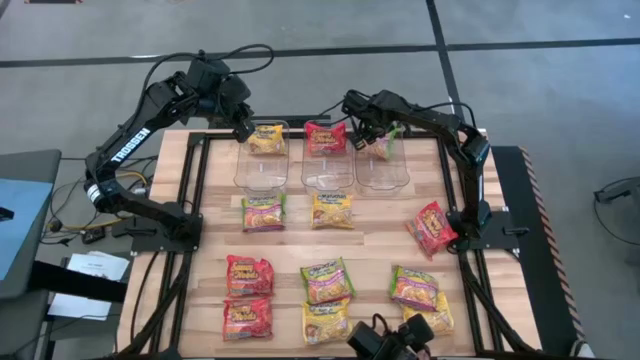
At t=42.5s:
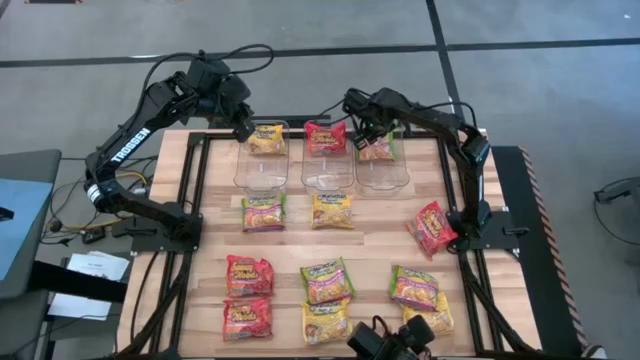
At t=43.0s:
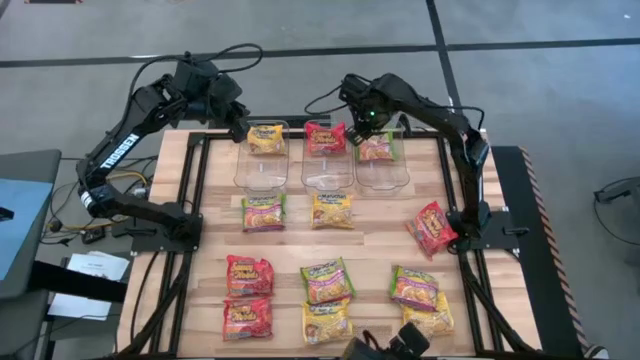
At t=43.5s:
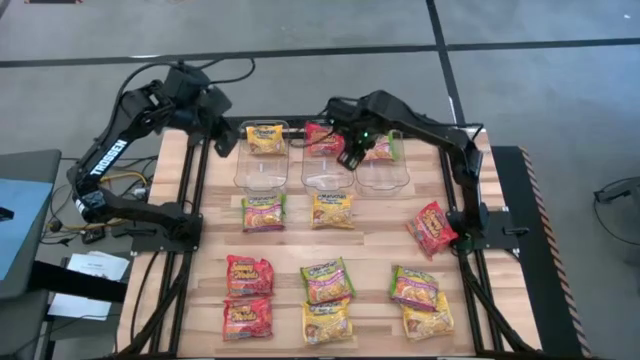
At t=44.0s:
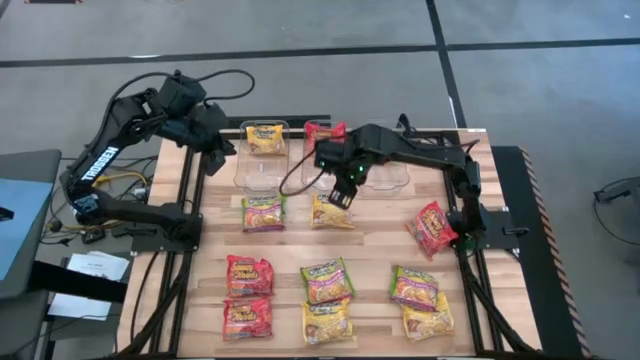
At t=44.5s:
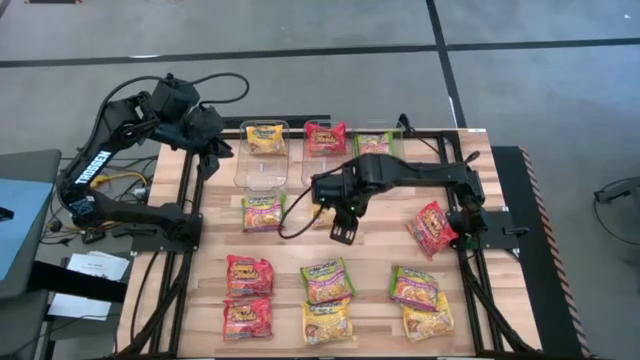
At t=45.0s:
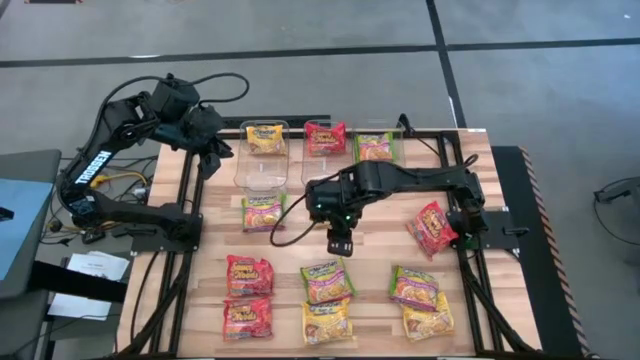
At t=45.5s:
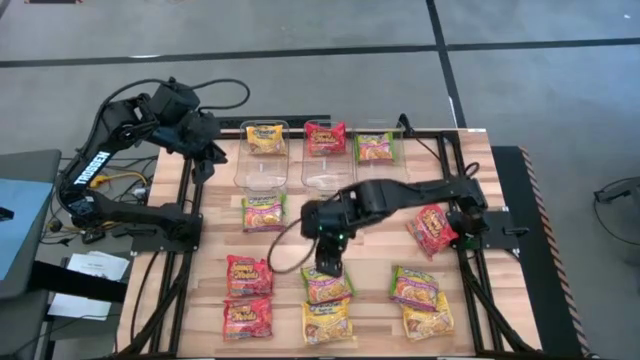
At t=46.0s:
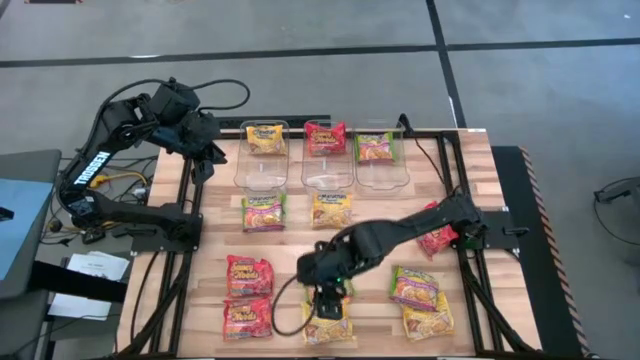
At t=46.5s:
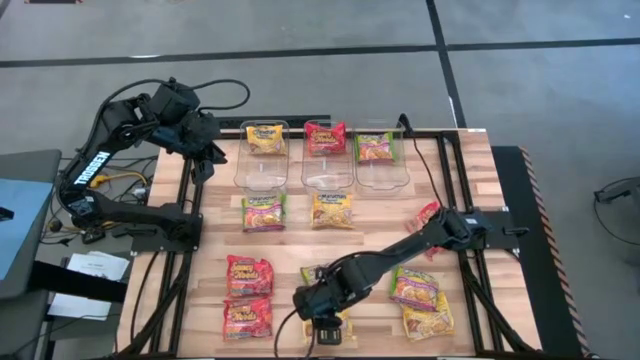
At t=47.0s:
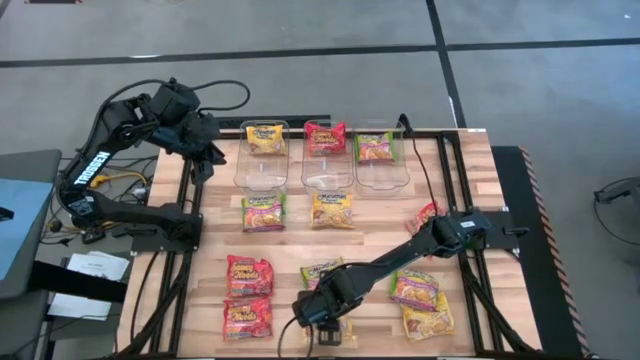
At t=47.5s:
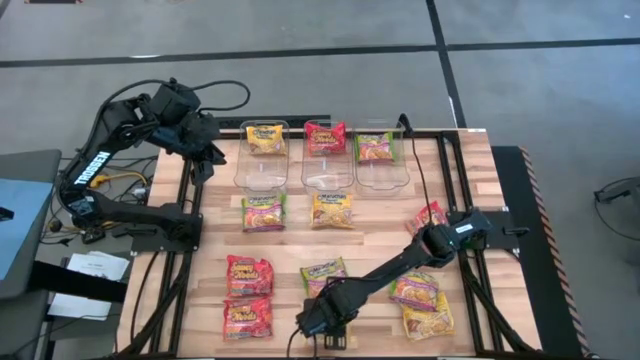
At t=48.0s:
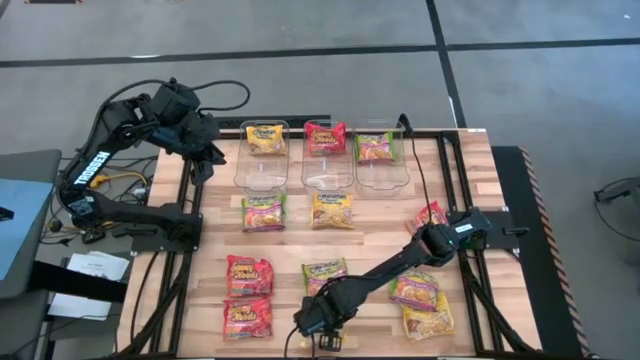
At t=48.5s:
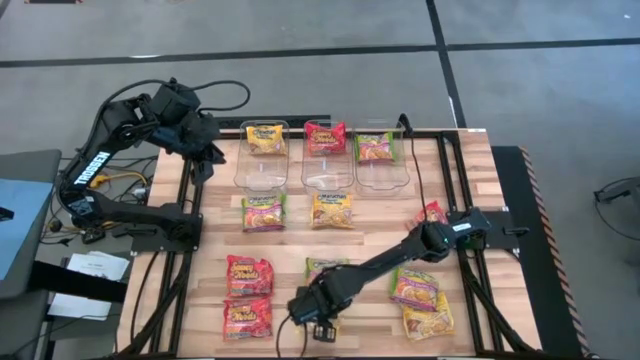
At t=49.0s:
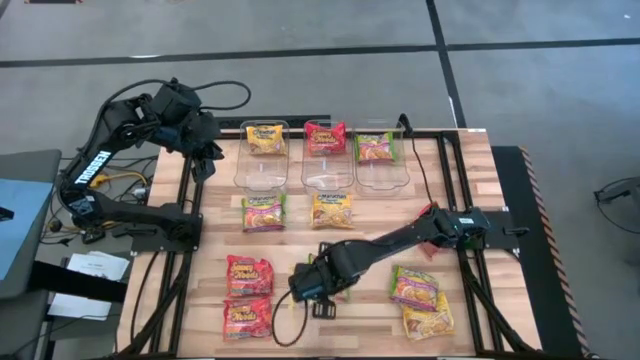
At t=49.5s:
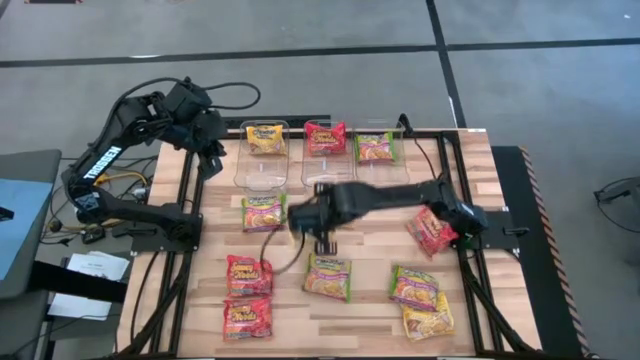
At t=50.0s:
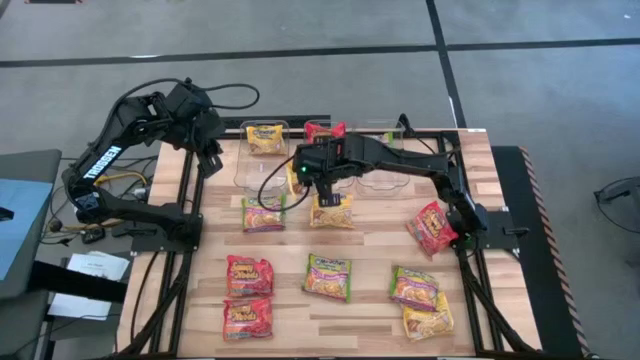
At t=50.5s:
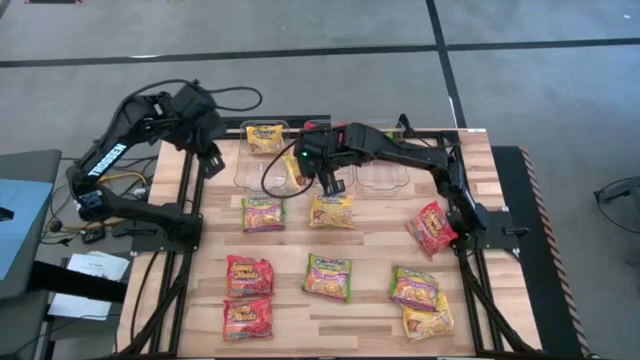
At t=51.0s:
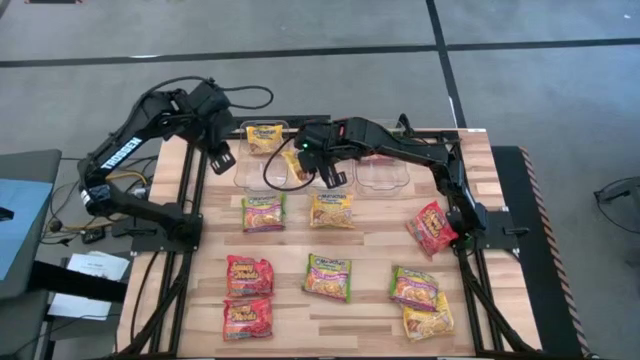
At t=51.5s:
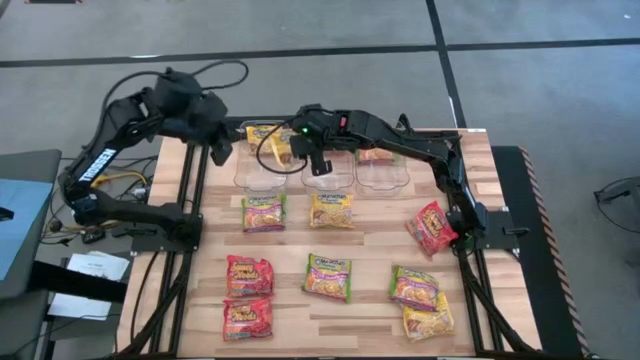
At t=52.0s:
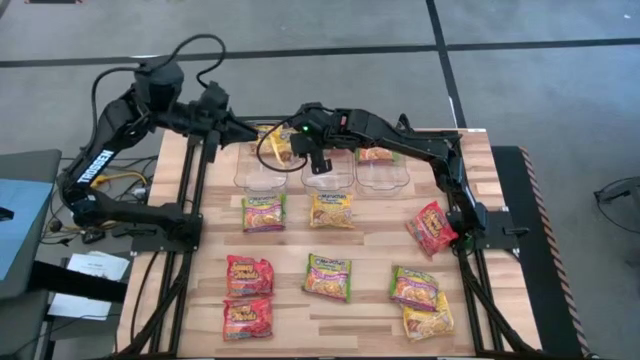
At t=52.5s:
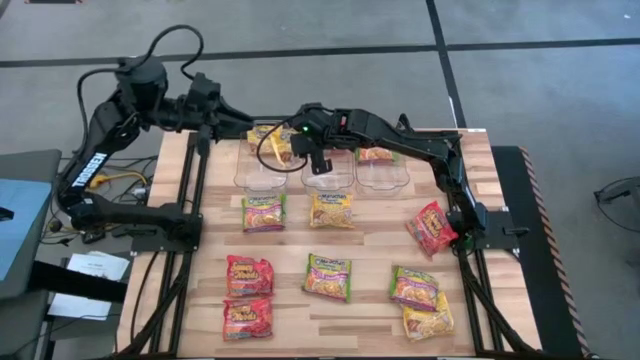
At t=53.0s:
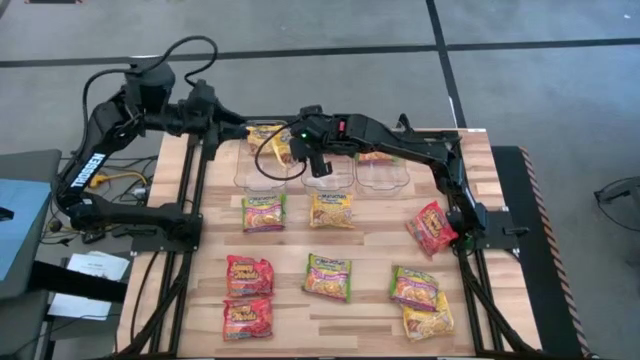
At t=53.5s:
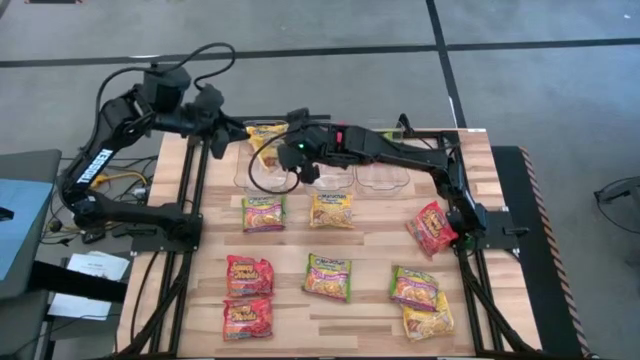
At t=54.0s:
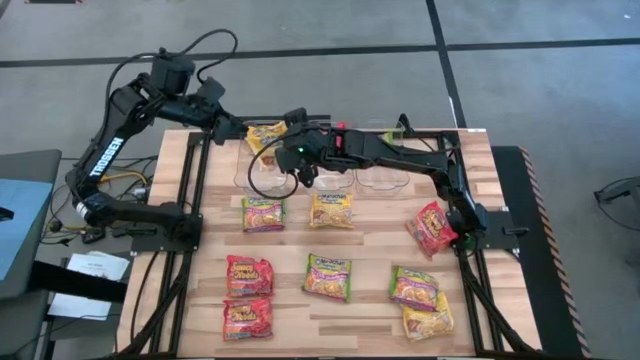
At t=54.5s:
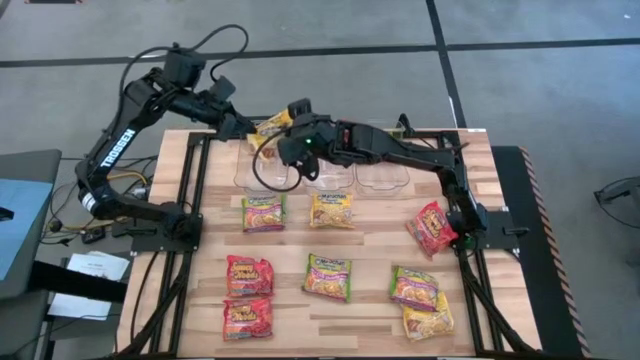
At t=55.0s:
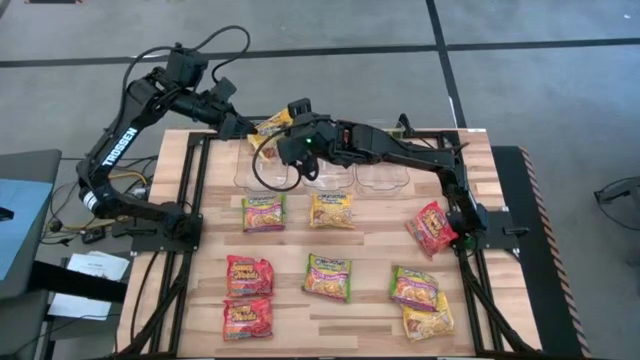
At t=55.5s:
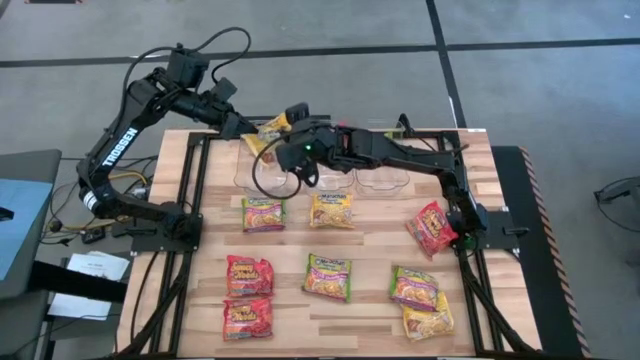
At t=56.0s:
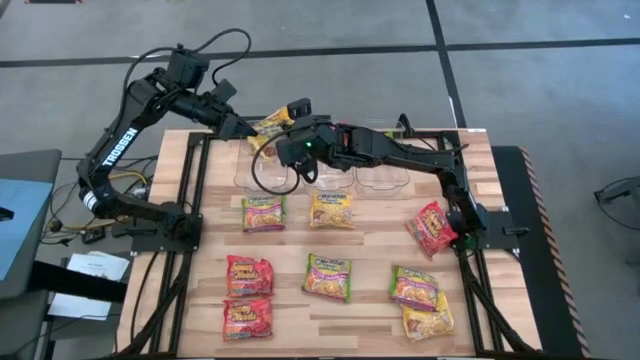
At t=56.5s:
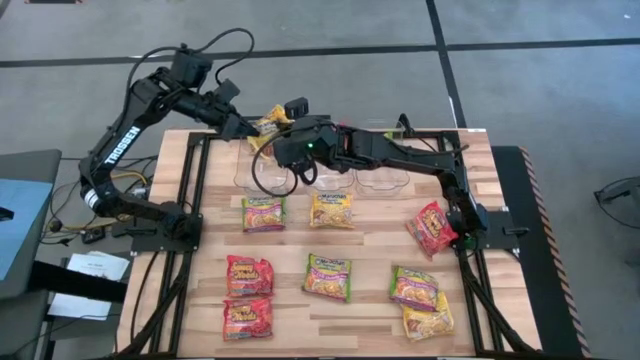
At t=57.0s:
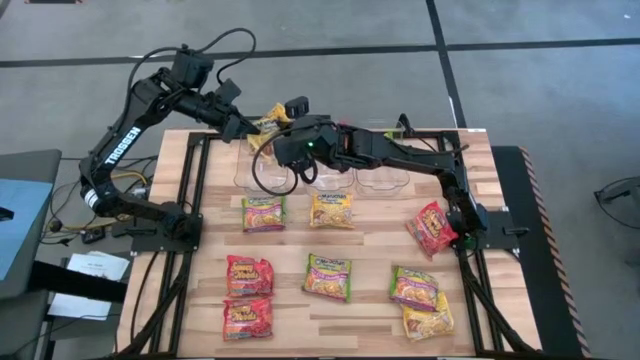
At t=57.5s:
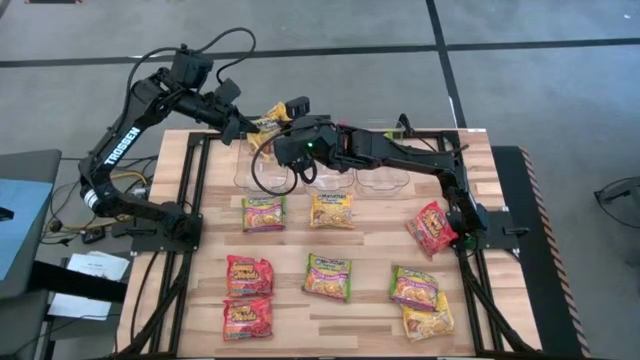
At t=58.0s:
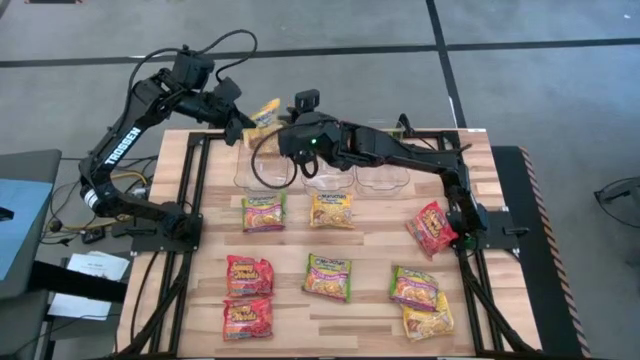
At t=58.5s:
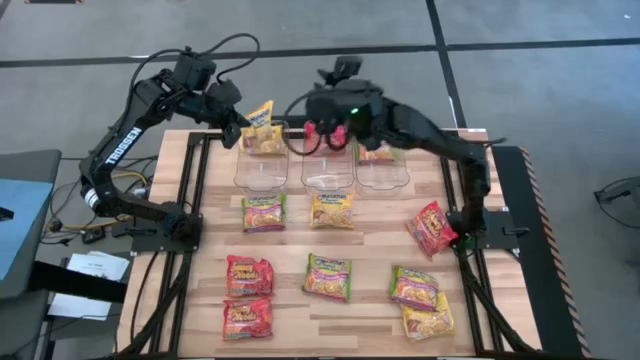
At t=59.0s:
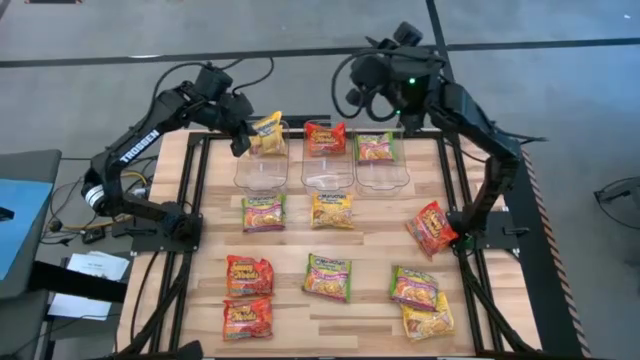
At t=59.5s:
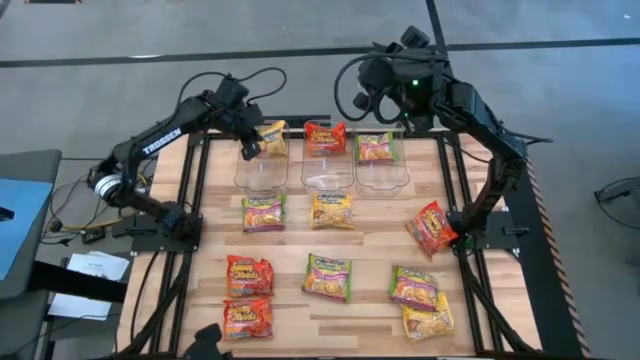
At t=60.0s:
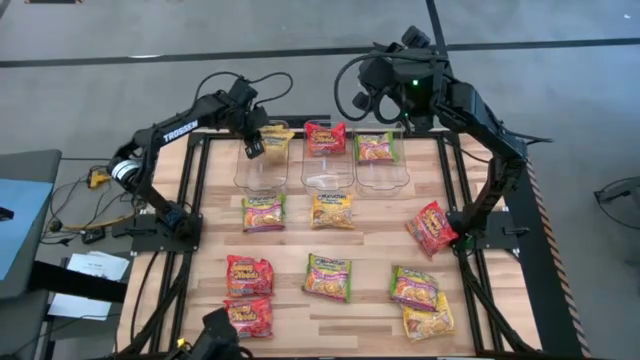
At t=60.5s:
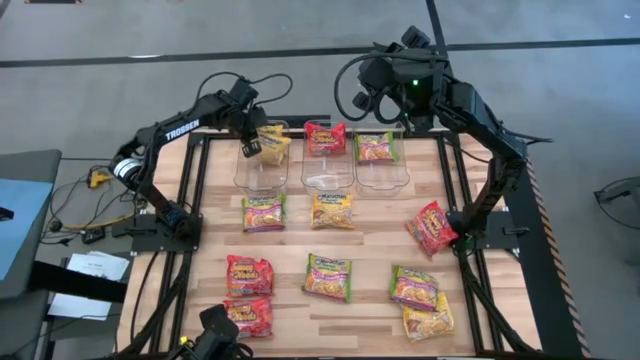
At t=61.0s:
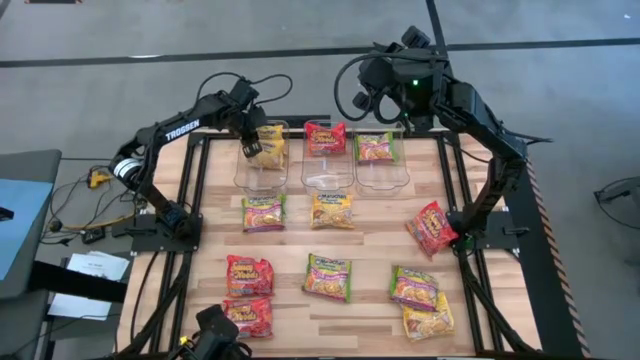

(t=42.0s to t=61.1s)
Task: Sort Maruchan noodles
Put the yellow noodle pack into the left transparent bin

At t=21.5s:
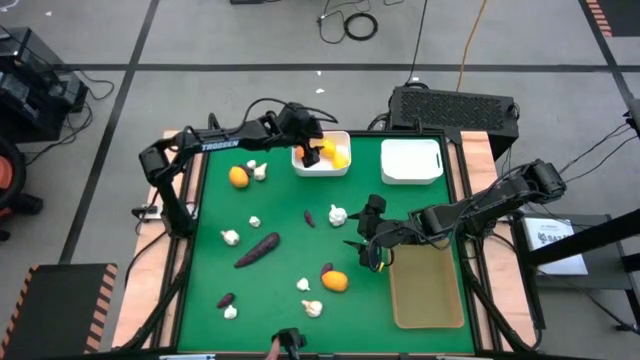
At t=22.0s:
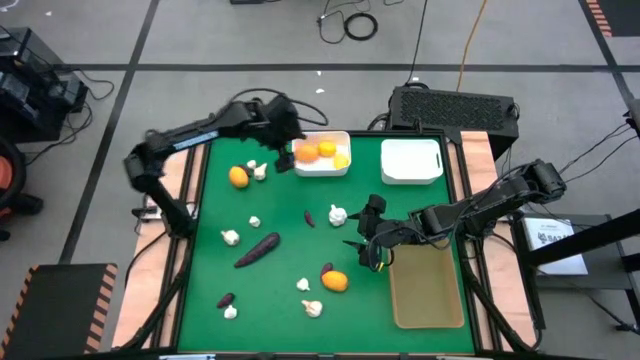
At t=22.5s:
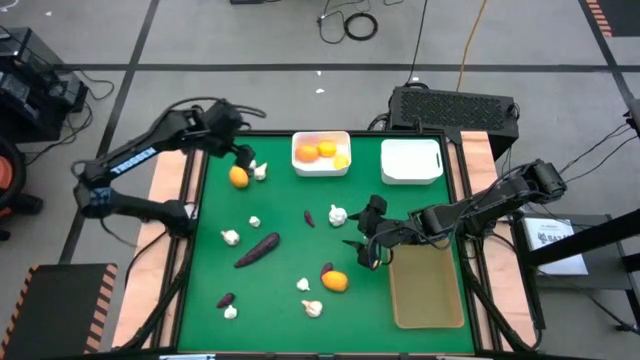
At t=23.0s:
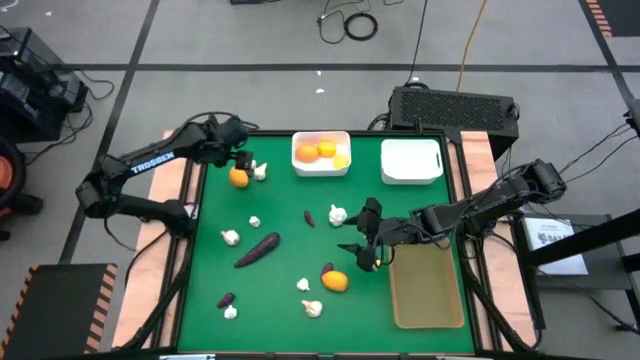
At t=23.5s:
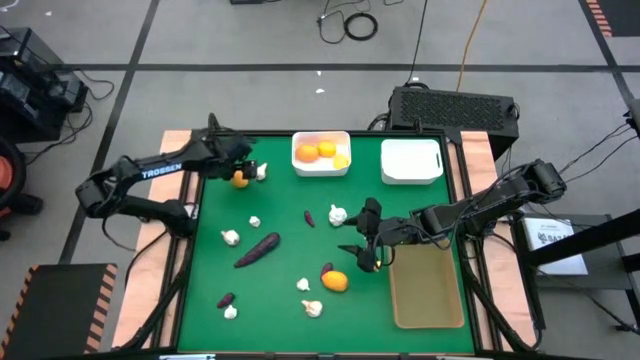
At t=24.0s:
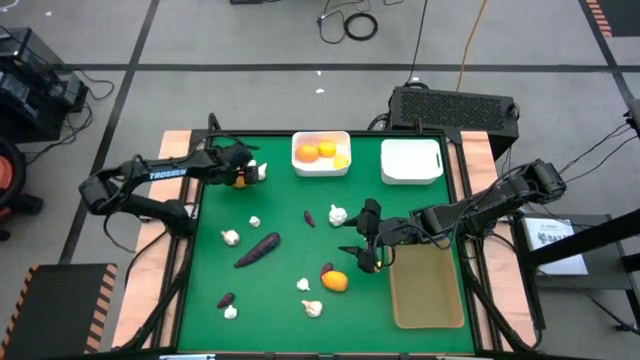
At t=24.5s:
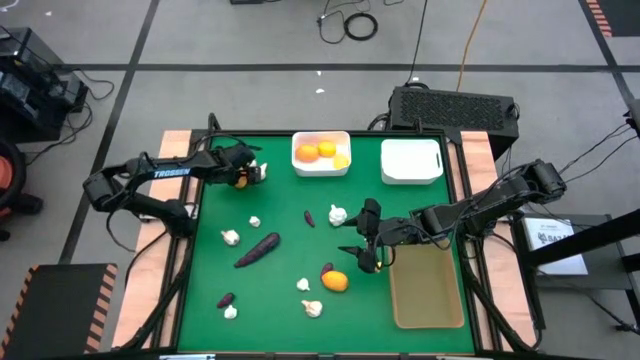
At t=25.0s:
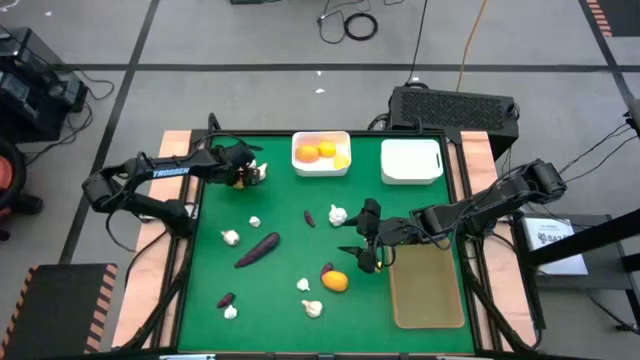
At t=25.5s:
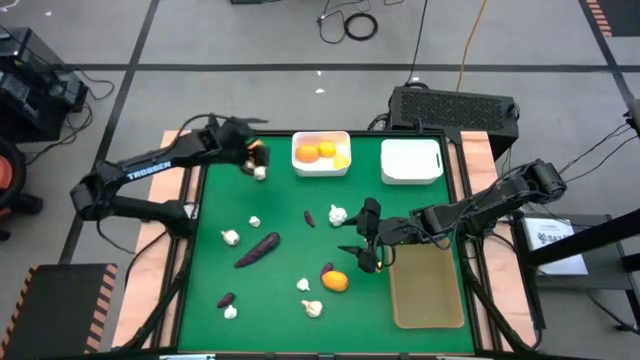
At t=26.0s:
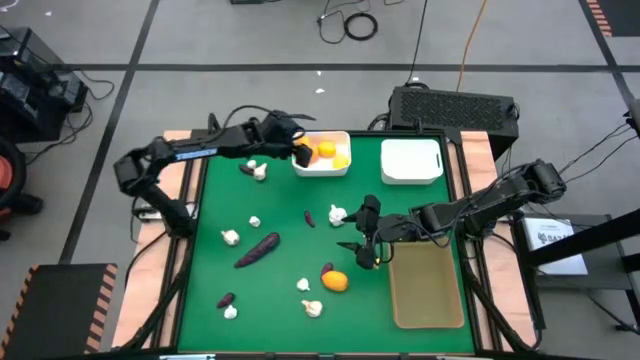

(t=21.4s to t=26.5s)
Task: Sort produce into baskets
Put the lemon into the left white bin
